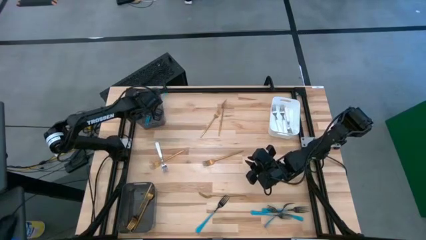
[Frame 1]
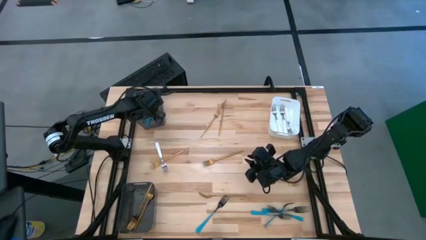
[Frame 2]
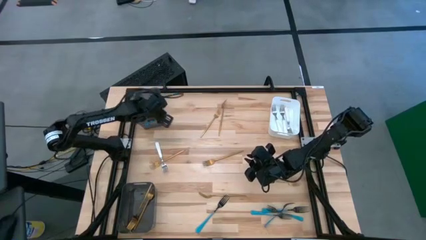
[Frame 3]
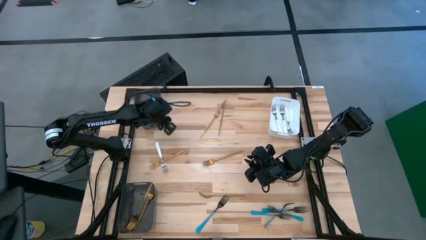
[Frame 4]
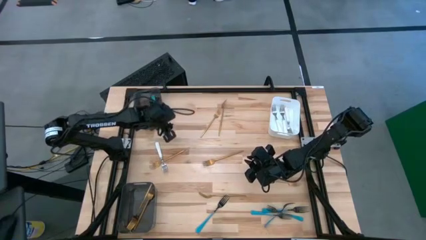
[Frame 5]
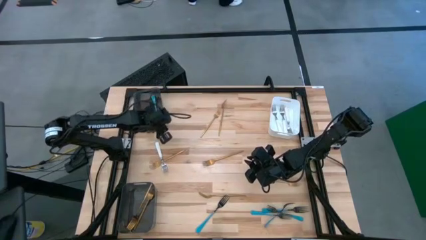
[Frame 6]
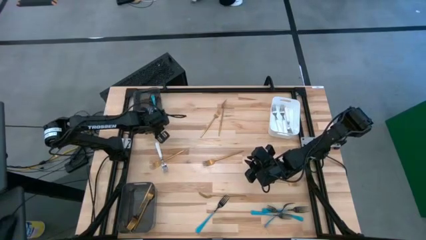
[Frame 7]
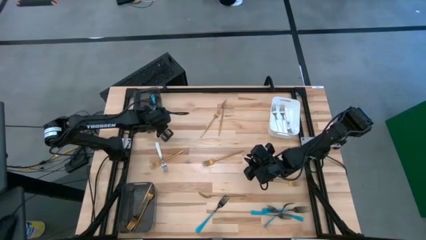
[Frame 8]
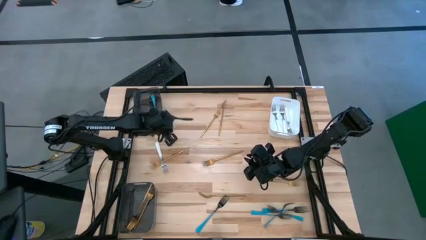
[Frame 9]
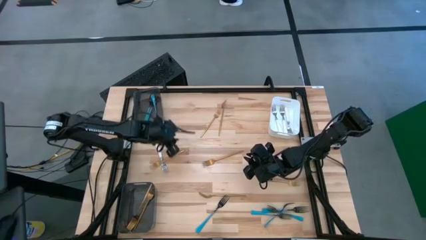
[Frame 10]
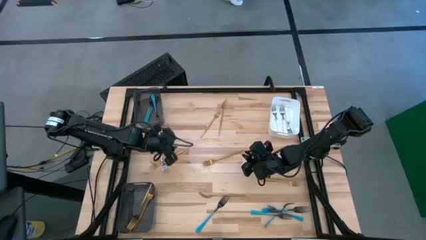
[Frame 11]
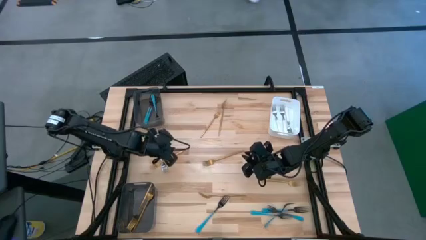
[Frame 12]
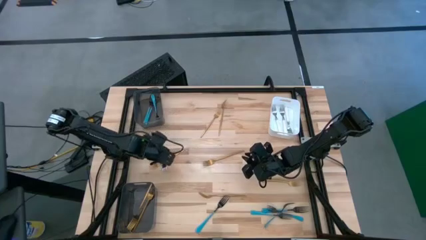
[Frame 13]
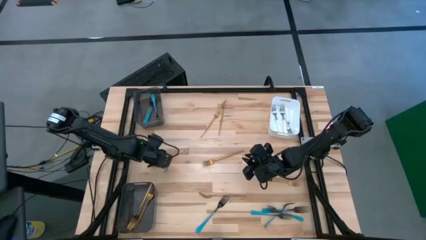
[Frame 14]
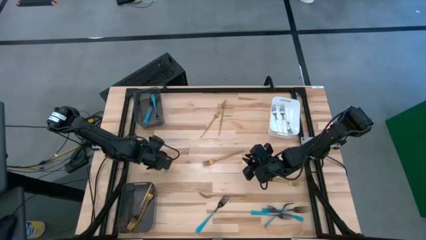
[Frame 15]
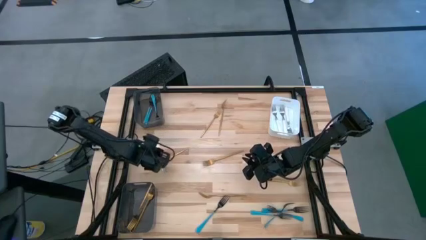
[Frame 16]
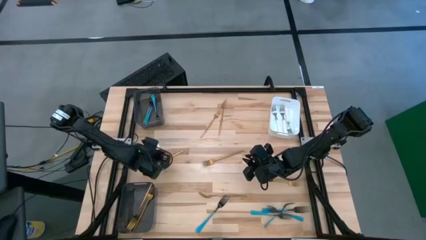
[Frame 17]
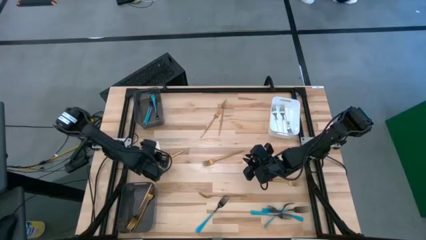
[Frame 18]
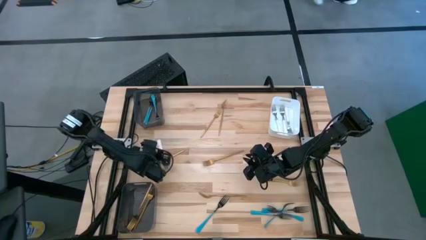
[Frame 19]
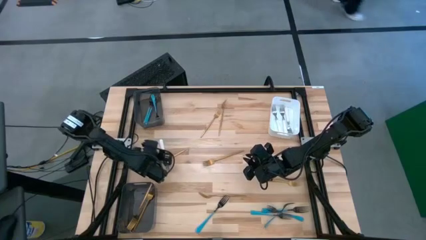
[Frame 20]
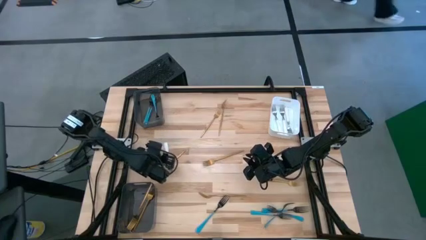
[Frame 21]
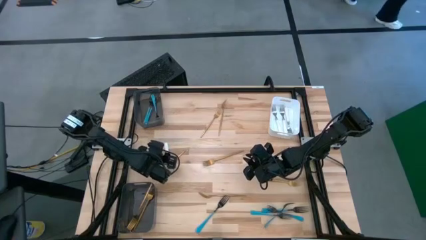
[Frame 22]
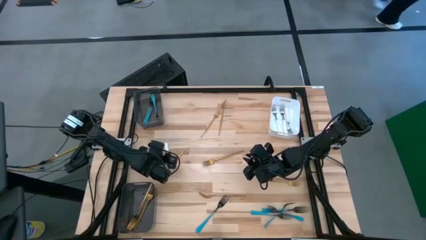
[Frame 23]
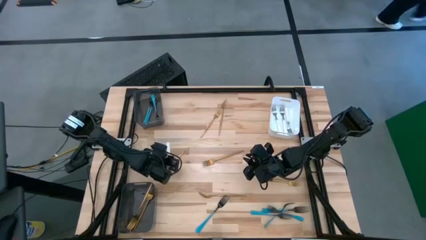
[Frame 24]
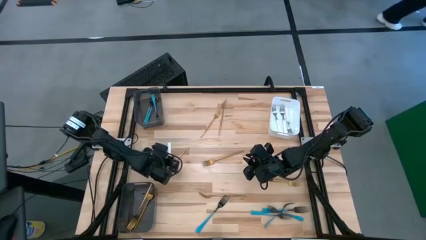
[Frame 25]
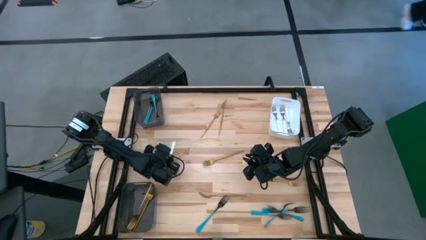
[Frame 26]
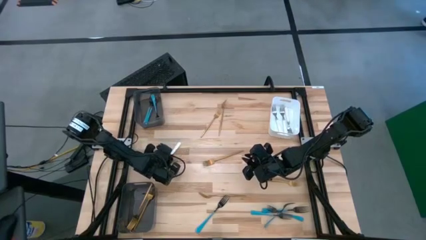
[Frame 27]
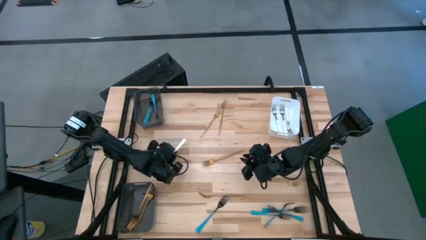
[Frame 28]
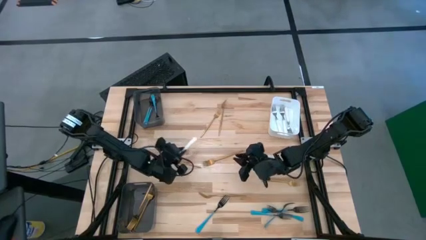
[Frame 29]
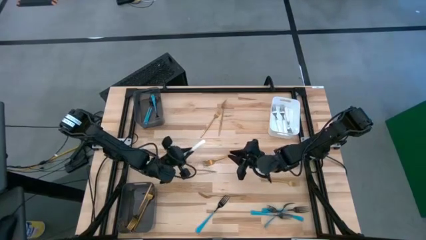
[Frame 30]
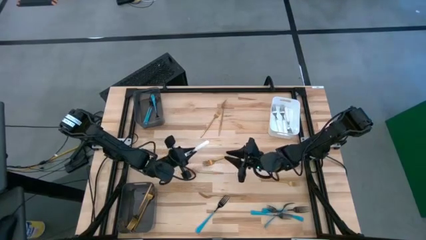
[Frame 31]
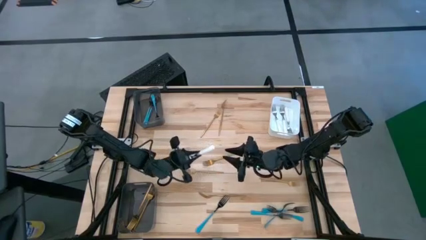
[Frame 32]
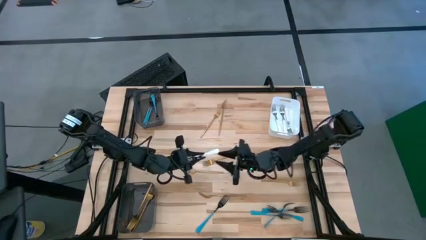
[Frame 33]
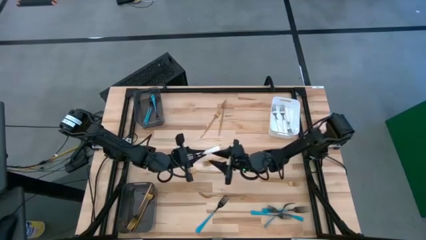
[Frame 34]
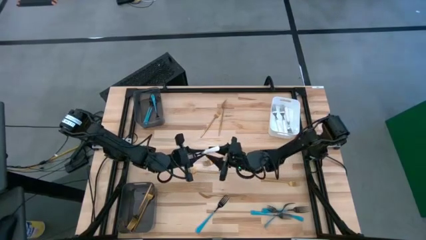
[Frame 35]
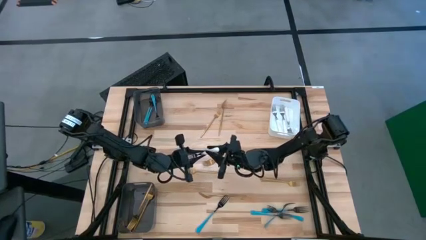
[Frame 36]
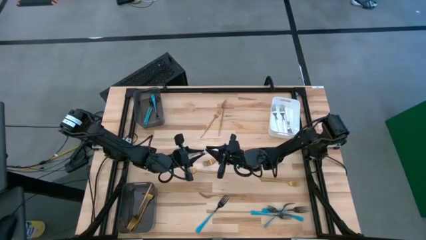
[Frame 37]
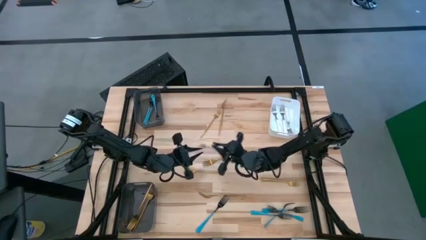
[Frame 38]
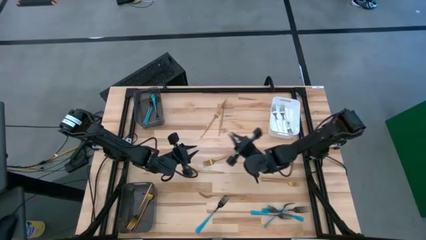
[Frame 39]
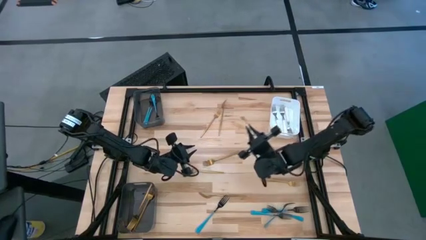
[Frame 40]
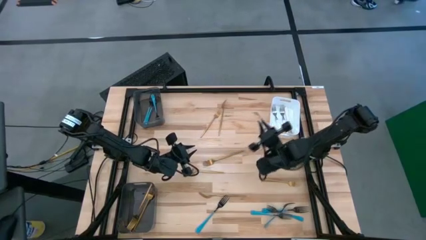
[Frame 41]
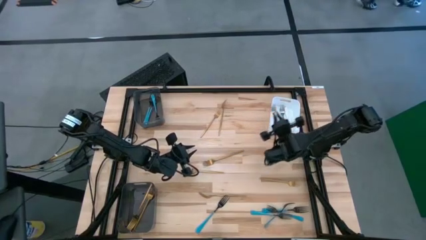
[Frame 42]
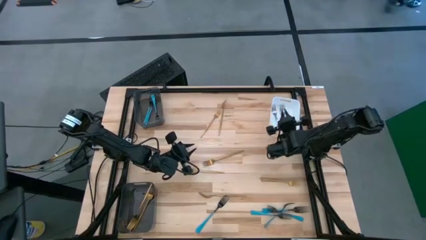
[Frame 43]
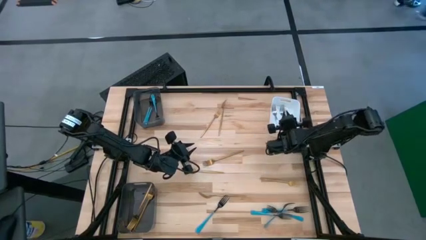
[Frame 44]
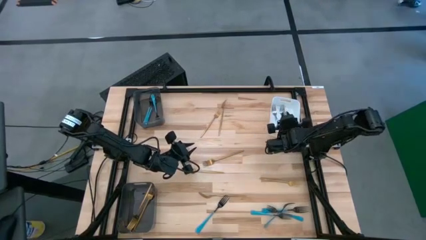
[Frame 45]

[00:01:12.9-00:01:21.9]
Task: Sort silverware by color (type)
Put the white fork into the white bin

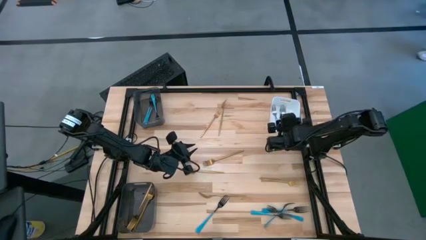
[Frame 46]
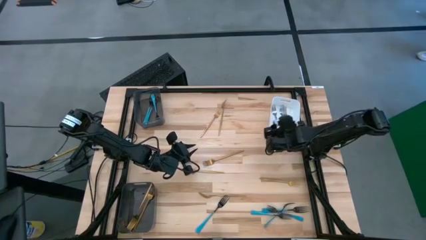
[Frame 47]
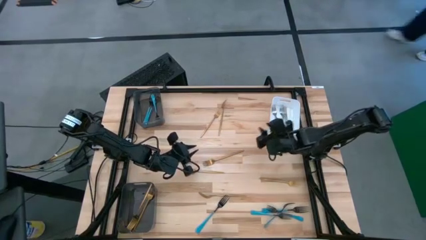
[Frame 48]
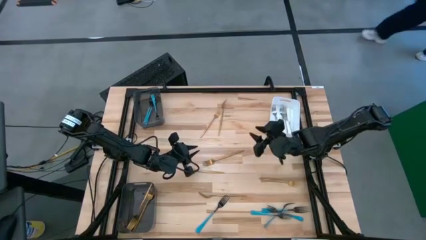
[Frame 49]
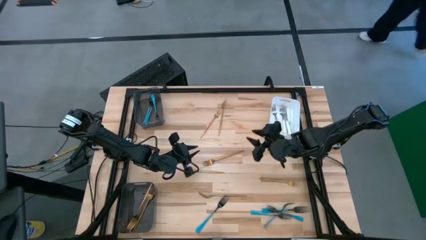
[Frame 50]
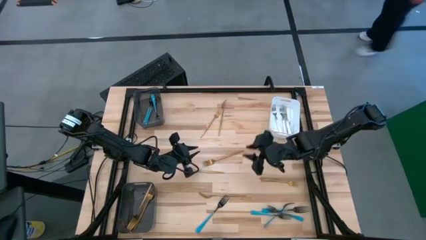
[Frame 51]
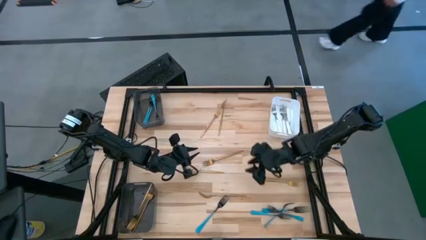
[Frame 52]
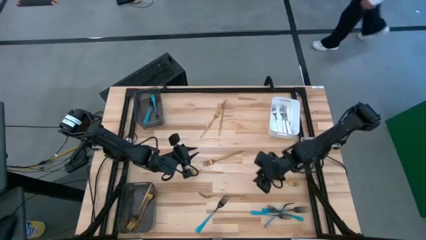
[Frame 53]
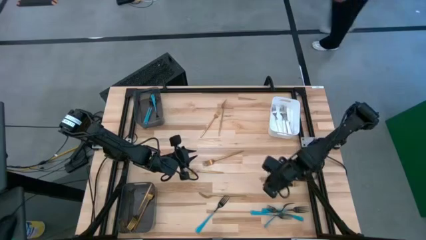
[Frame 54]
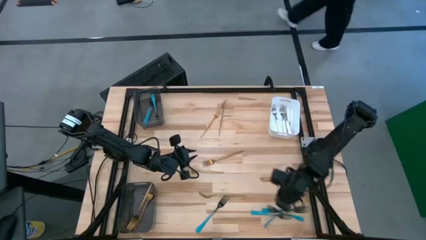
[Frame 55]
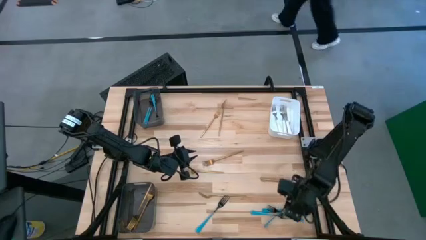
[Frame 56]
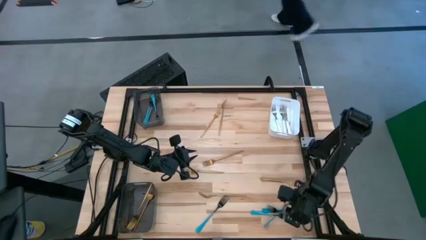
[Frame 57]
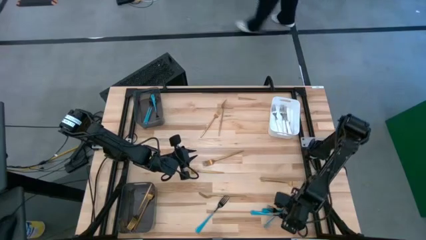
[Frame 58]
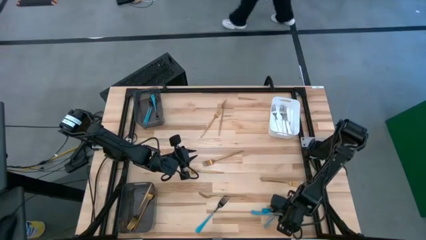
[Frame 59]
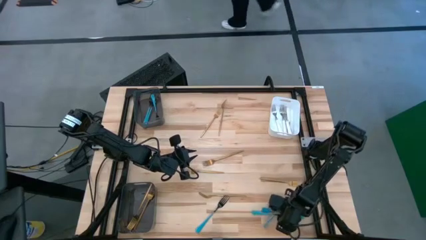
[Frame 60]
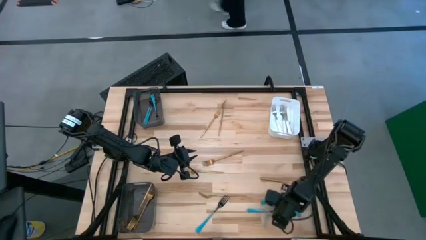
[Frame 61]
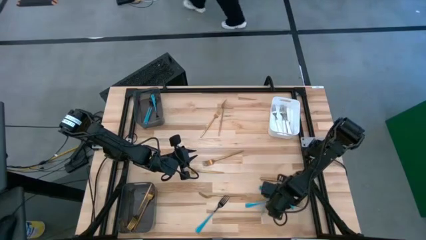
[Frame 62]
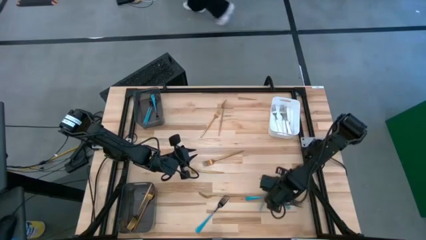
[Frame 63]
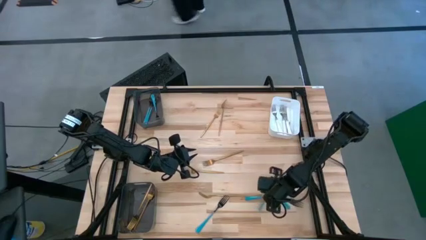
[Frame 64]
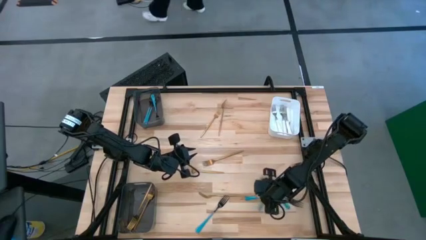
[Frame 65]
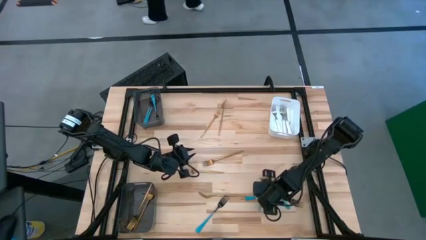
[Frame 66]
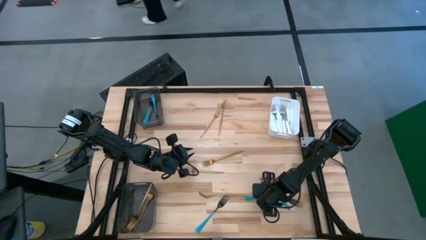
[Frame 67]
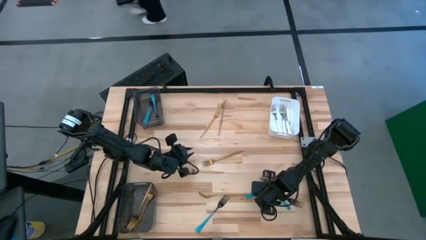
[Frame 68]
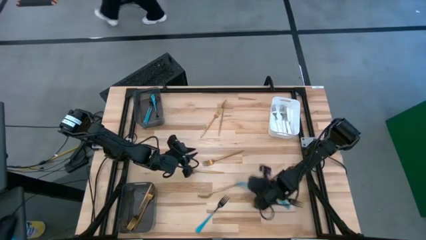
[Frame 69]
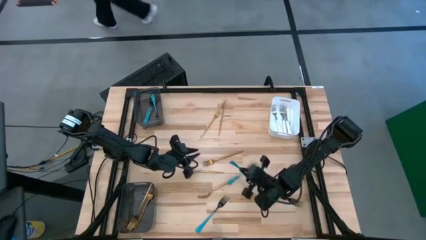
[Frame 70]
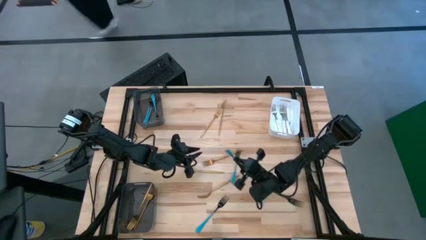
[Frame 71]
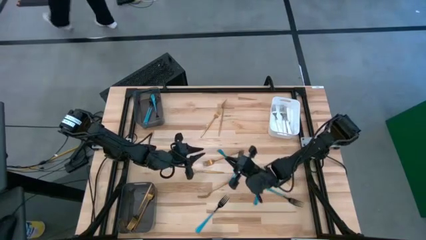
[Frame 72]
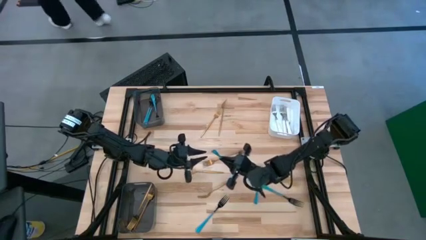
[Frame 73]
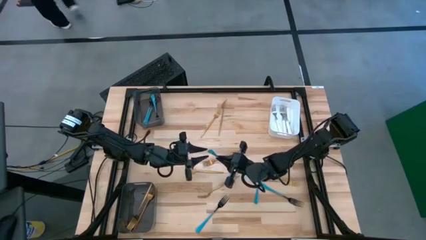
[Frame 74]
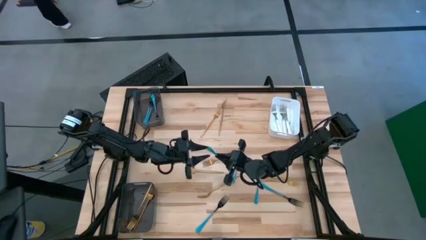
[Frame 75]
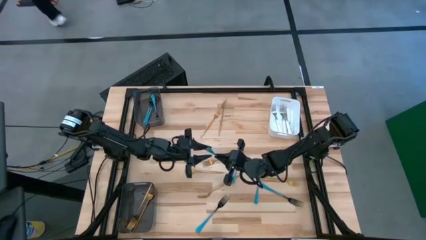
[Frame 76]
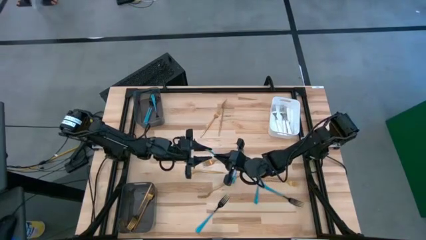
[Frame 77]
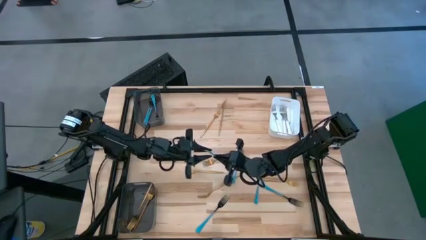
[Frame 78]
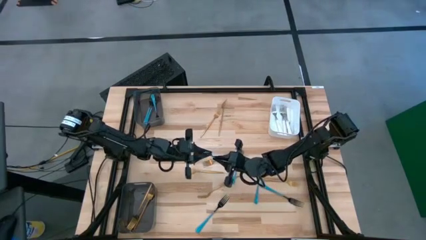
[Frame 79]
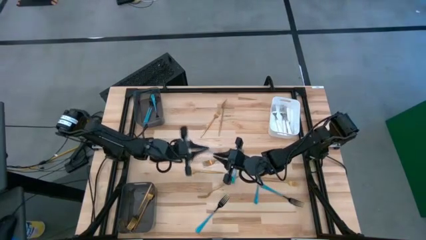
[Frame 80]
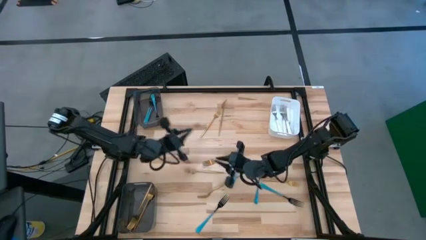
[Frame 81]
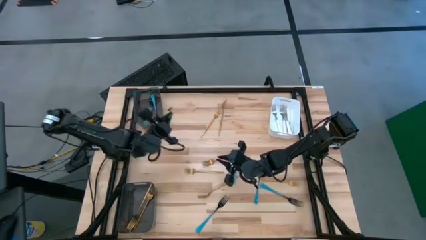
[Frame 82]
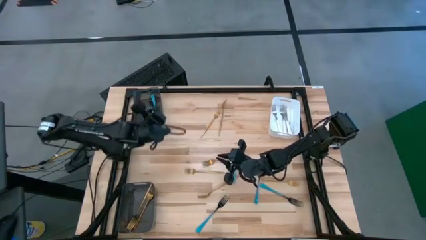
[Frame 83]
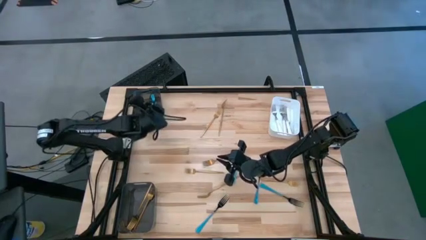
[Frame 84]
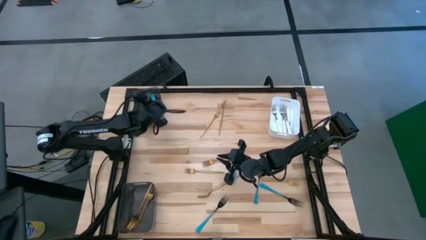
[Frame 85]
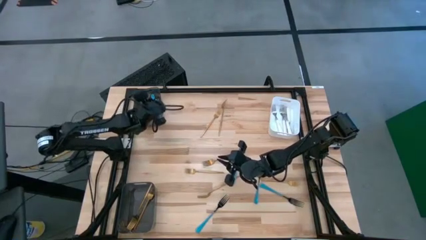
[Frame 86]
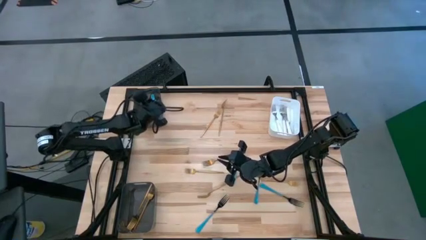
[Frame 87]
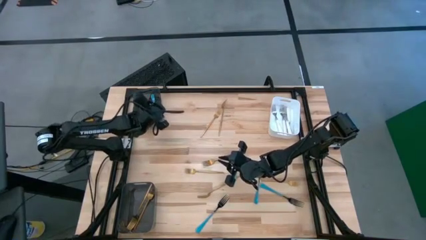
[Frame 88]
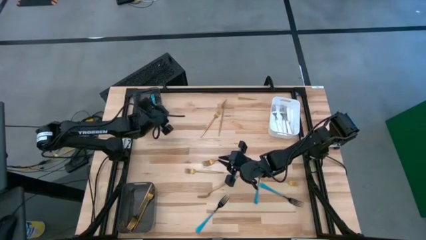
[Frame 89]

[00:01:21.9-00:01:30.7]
Put the blue fork into the top black bin
